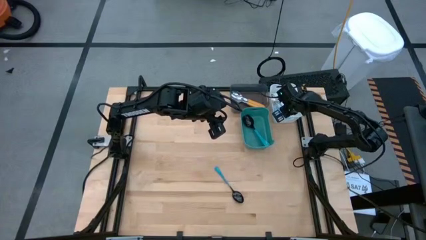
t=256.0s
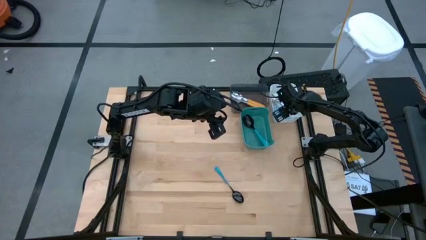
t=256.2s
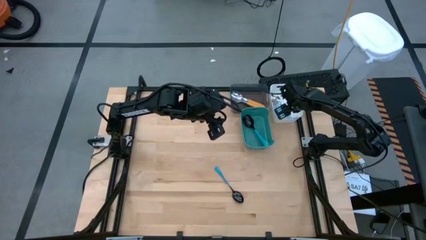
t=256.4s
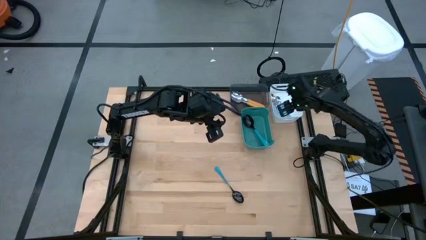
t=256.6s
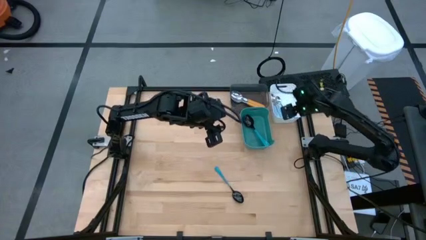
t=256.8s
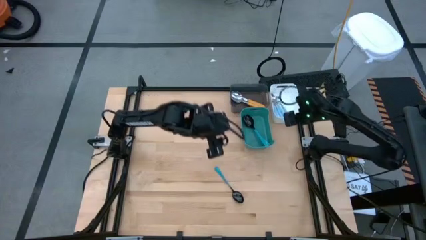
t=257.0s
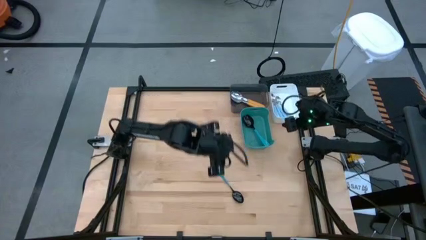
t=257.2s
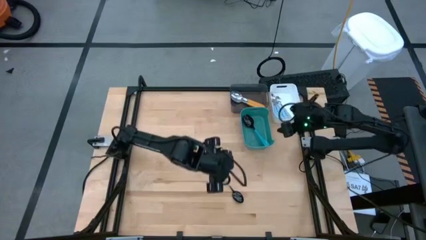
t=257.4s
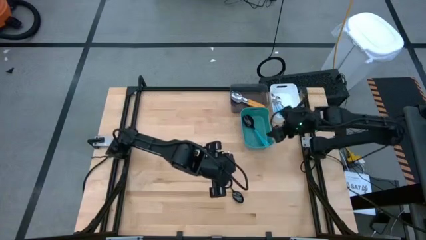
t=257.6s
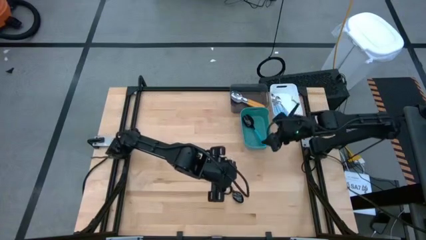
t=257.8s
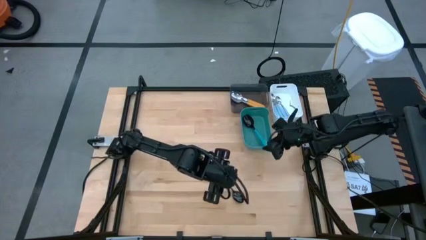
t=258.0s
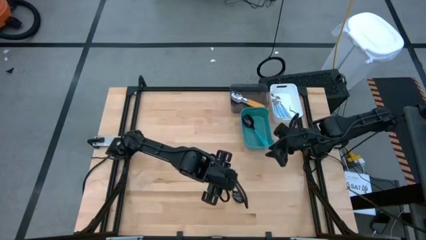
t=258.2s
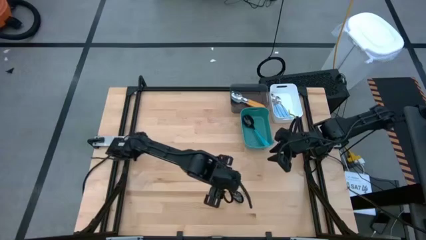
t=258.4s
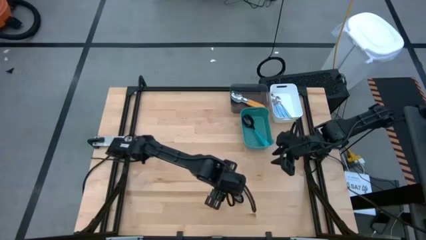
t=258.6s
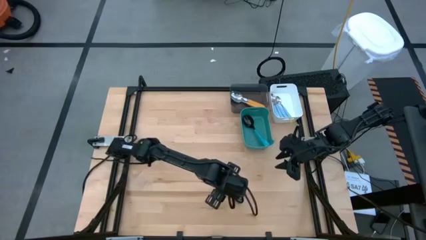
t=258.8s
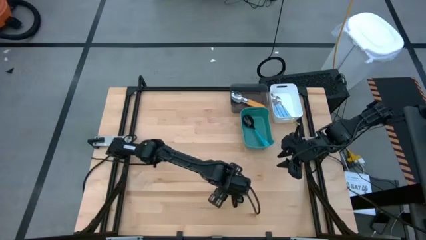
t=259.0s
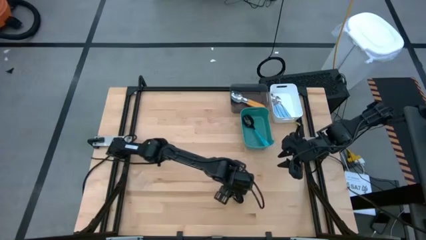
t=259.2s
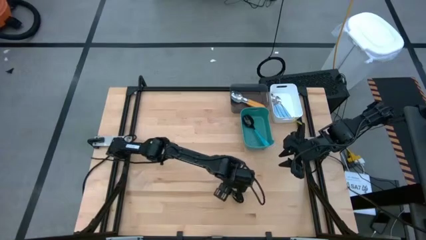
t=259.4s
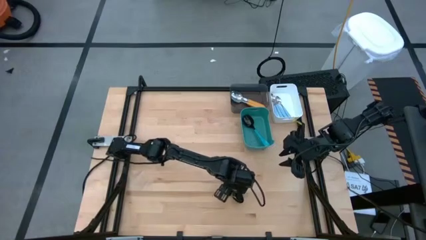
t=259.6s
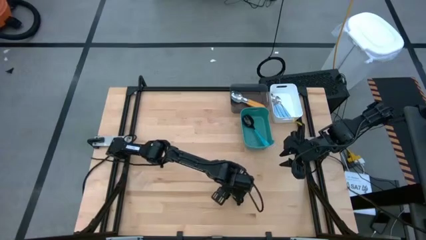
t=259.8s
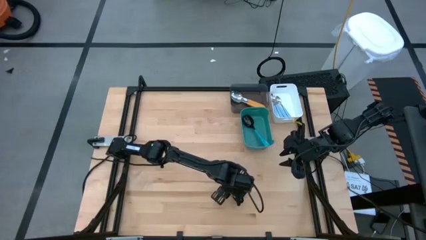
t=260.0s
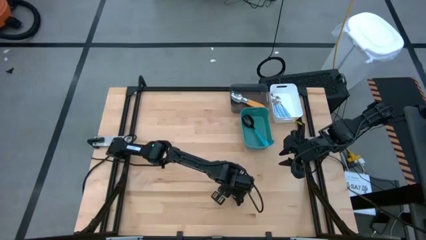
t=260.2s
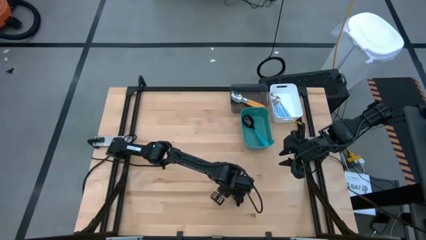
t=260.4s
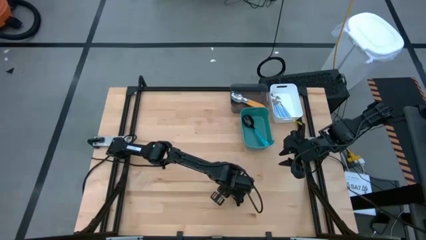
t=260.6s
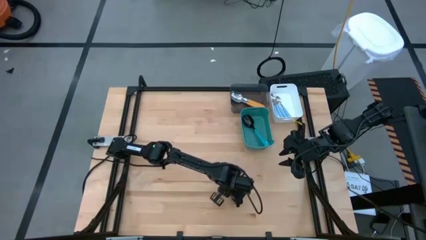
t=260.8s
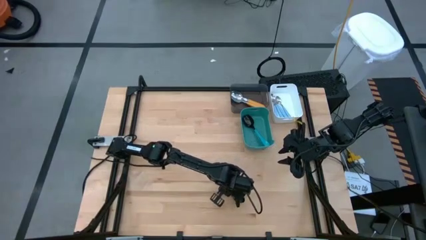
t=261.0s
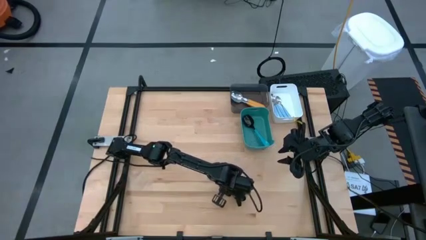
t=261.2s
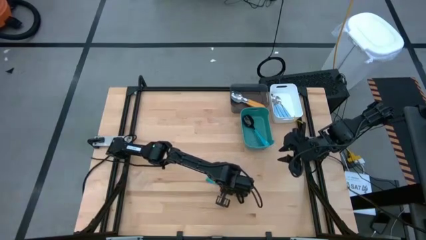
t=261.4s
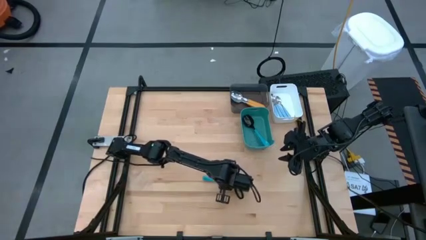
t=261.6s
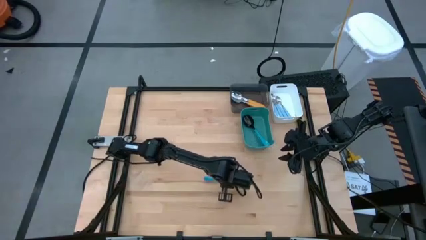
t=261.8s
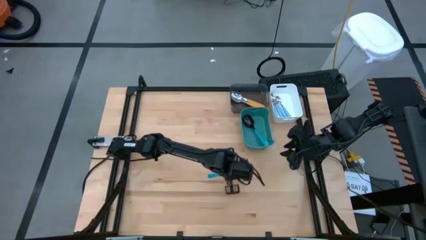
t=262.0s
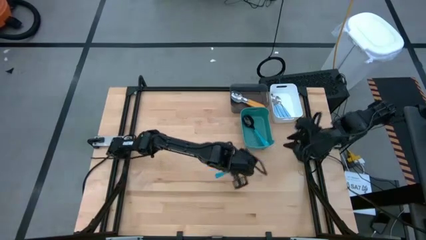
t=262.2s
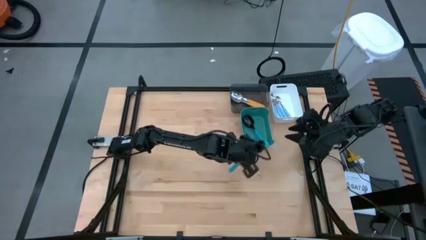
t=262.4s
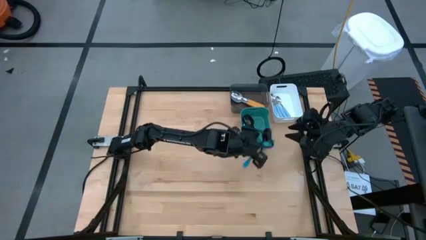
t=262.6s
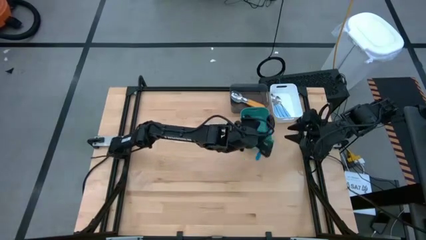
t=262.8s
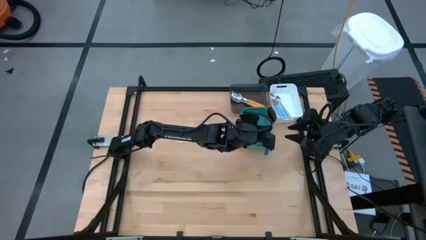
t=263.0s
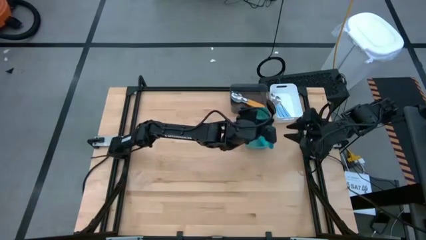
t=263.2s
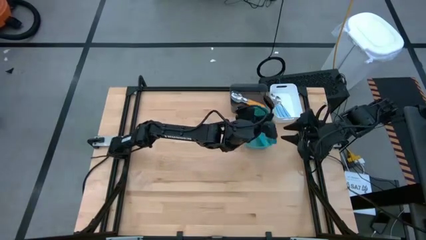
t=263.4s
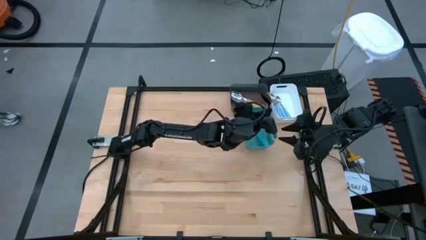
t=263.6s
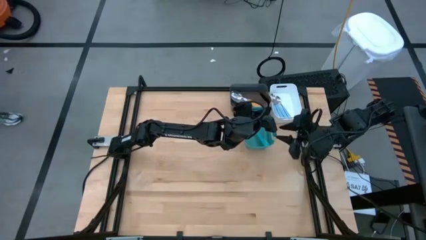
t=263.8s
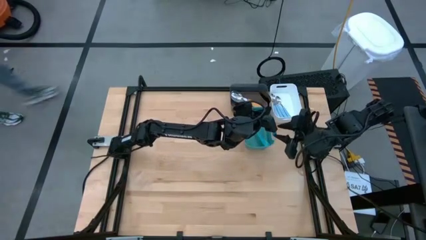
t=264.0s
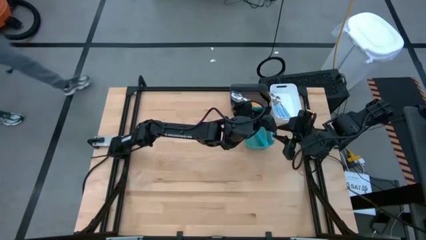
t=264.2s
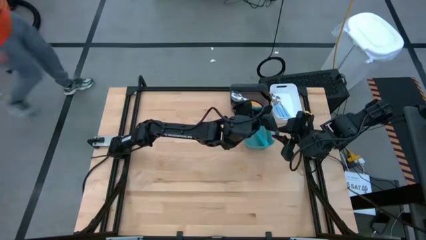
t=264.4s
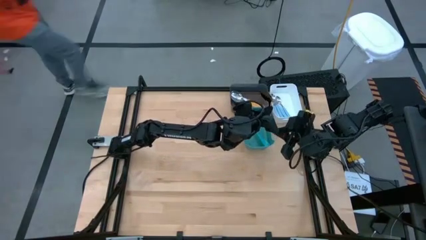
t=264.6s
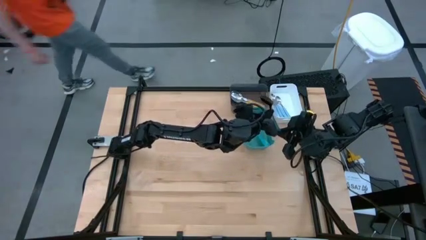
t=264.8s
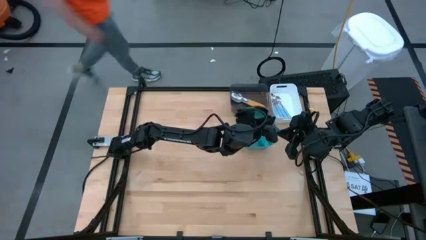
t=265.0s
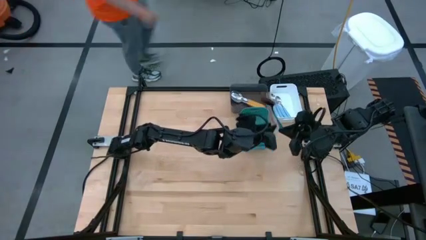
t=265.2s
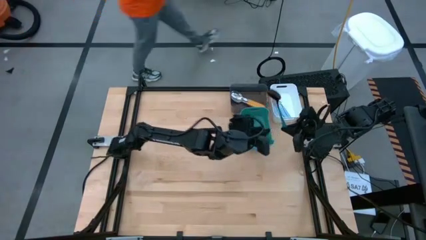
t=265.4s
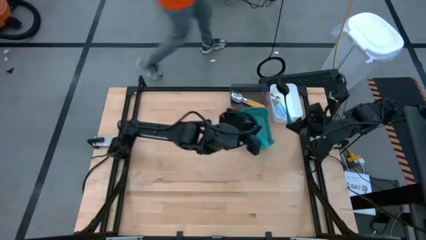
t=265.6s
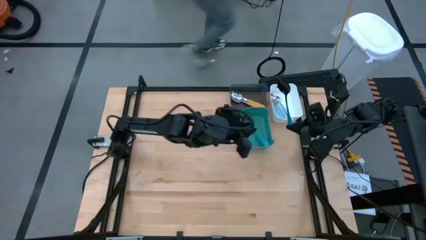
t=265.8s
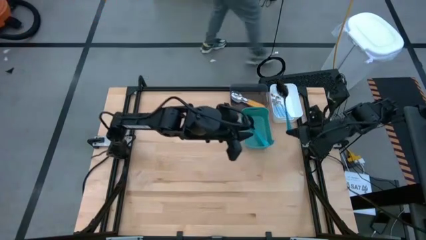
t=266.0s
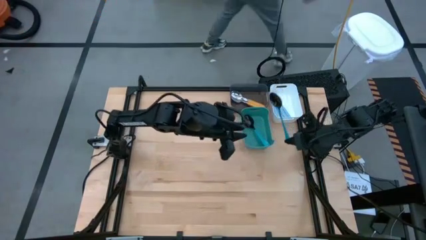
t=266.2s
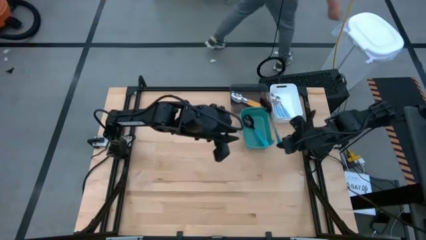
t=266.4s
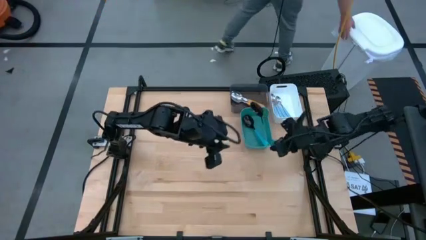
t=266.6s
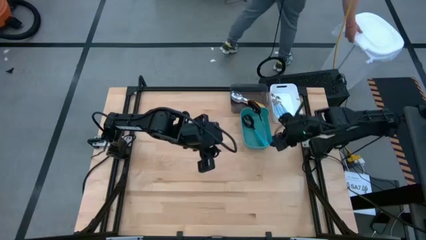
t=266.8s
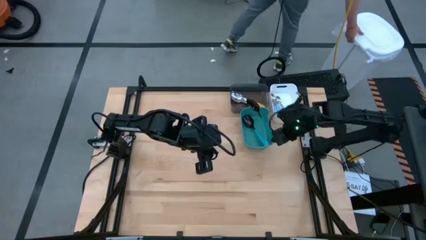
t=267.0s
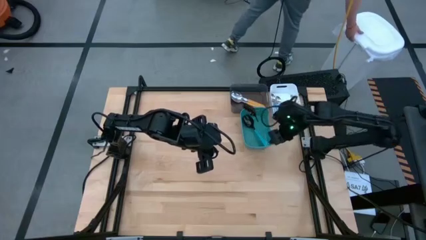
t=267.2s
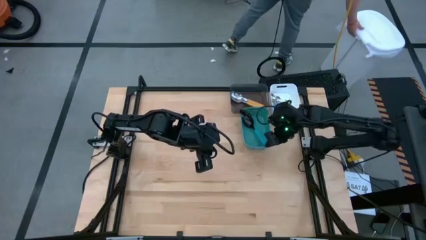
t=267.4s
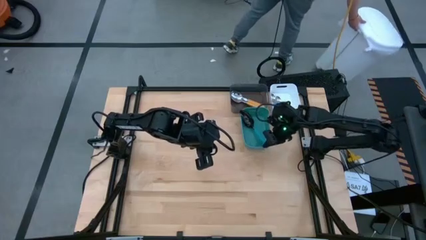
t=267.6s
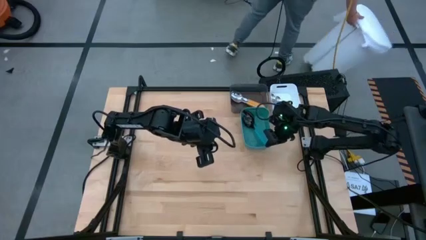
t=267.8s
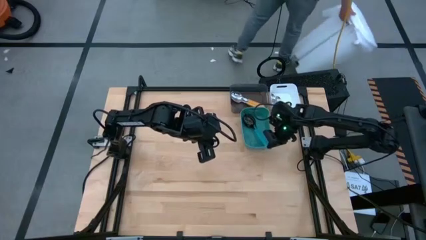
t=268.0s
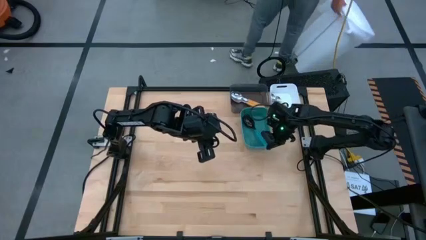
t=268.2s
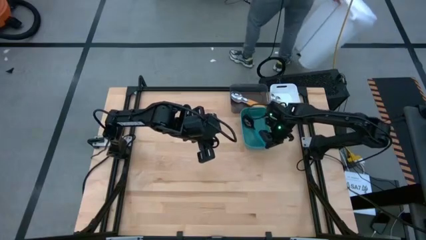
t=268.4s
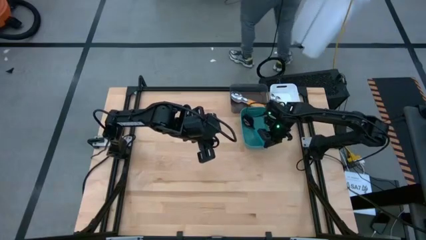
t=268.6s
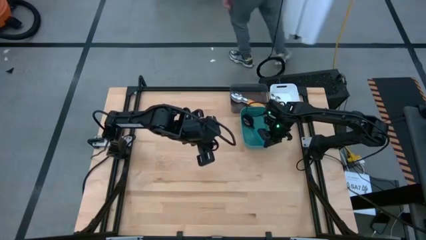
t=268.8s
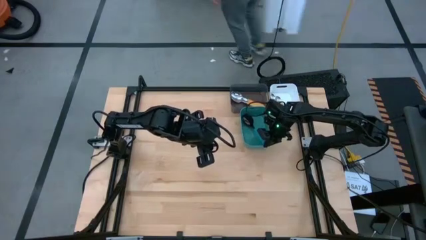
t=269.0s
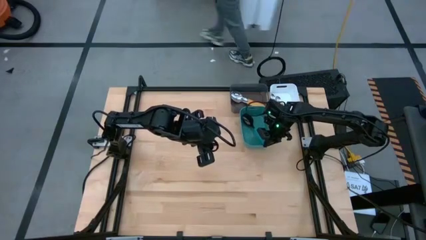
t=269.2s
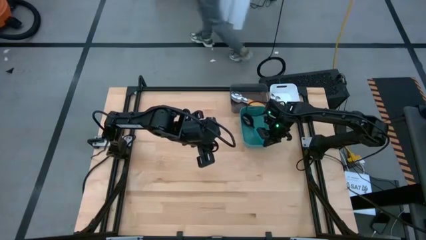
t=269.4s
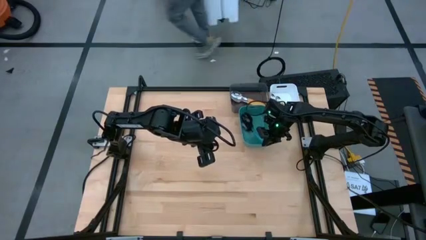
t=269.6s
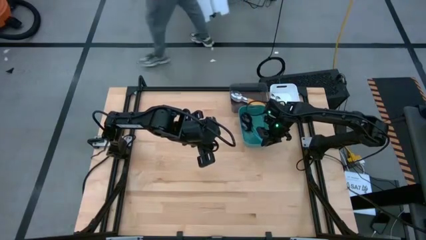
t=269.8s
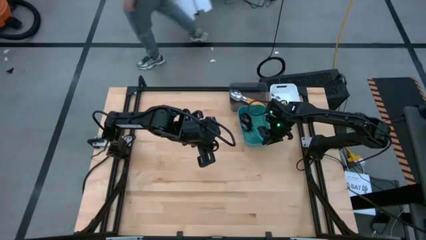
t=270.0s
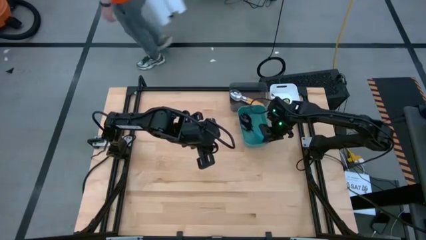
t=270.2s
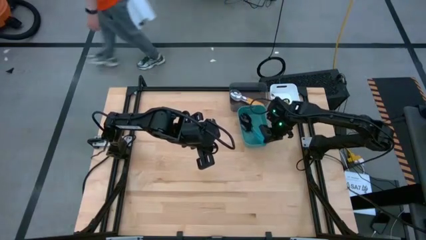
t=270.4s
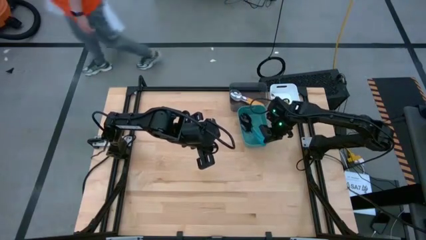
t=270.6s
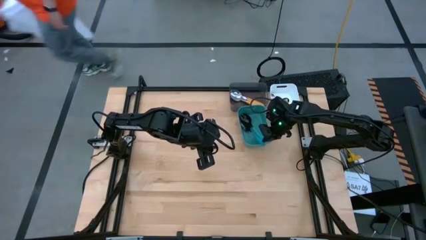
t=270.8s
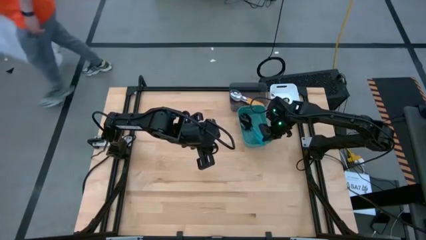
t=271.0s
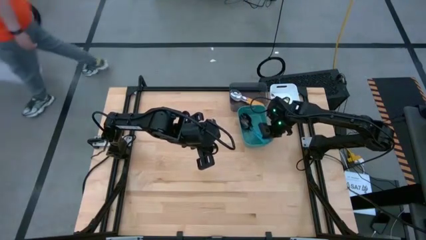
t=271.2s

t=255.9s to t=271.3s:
Task: Sort silverware by color (type)
Put the blue spoon into the green bin

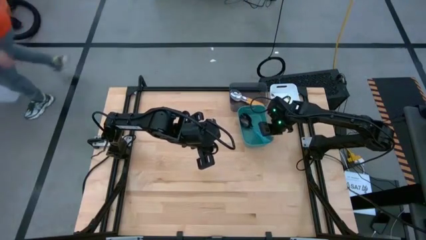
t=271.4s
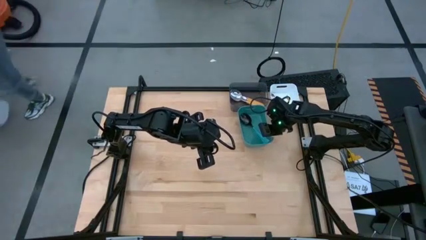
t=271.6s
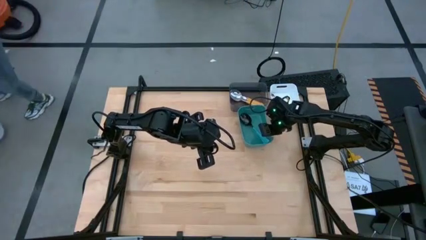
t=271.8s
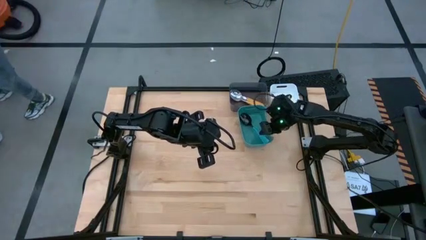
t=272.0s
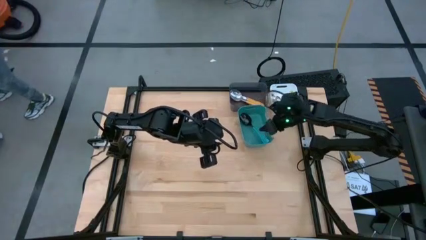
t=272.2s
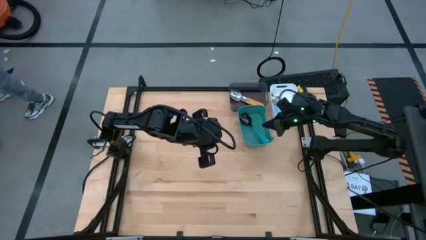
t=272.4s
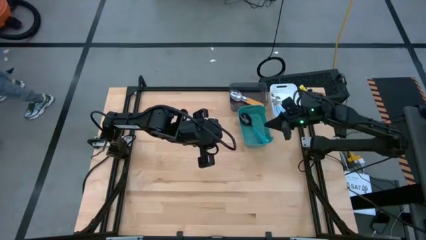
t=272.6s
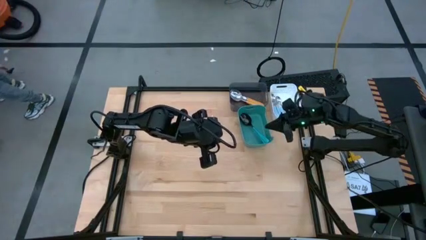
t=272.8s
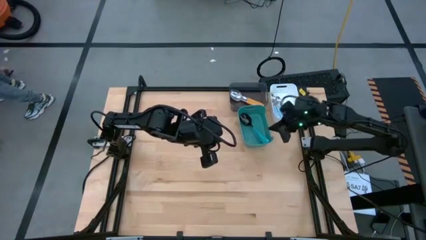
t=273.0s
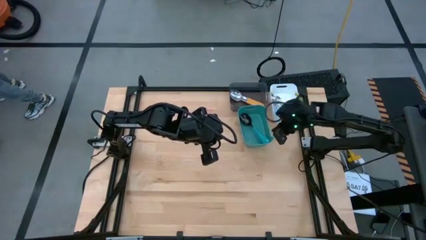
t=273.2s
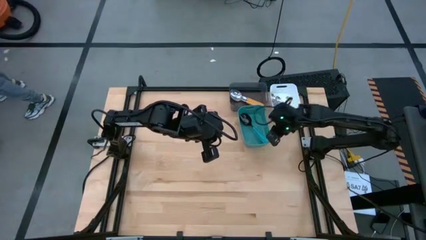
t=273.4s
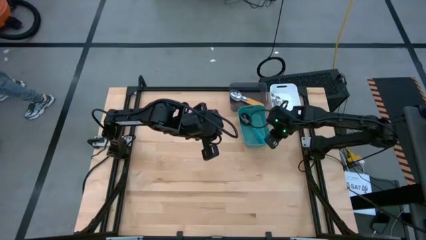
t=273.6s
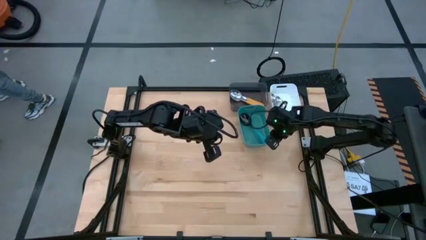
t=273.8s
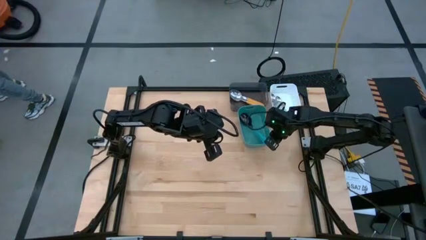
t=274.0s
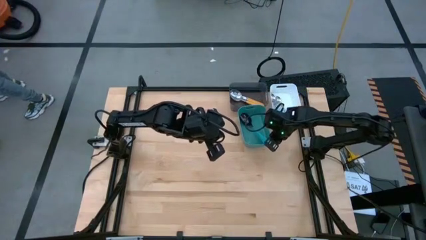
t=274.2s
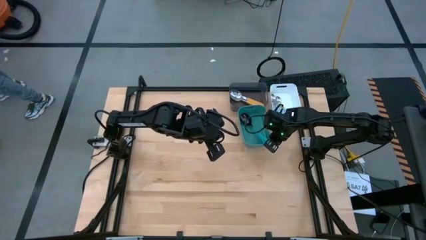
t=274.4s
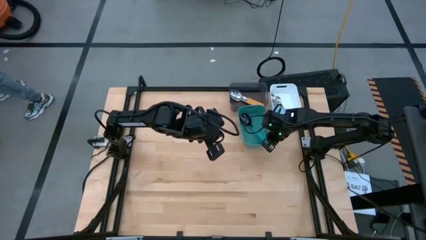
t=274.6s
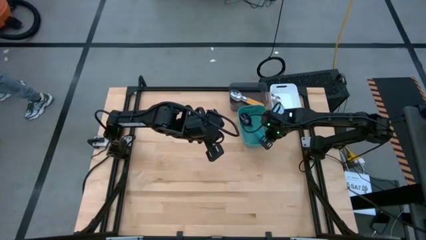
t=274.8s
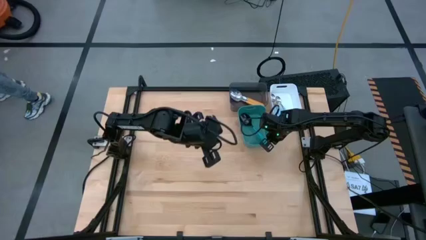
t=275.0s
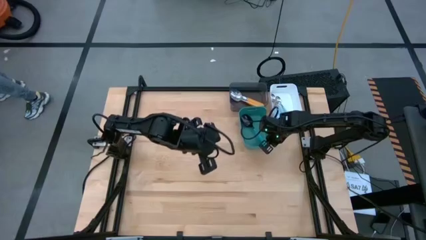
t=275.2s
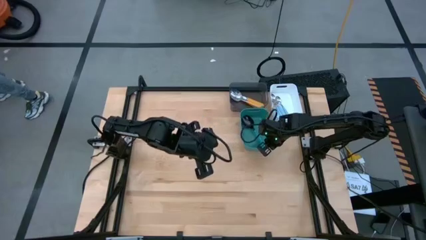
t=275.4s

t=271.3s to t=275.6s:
Adjust the green bin on the table
